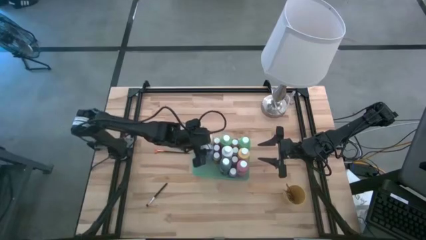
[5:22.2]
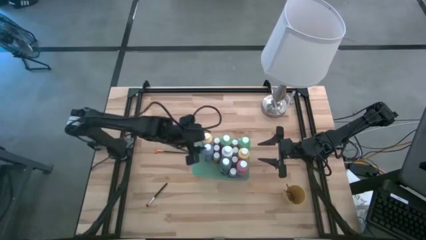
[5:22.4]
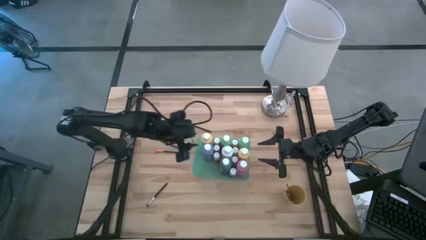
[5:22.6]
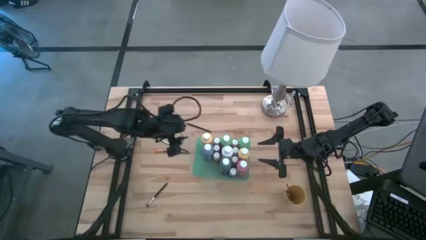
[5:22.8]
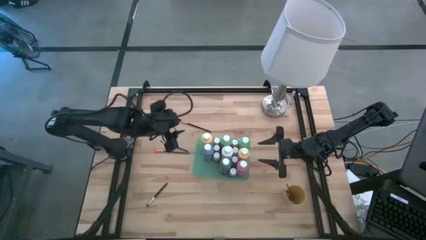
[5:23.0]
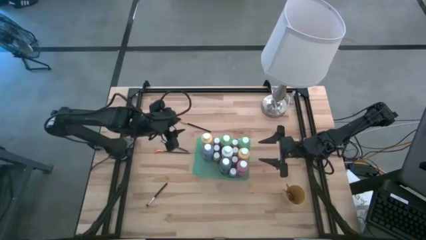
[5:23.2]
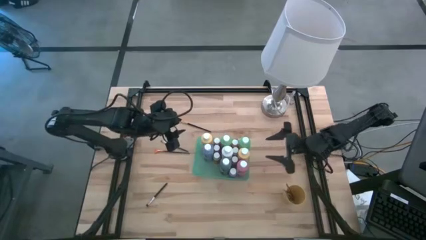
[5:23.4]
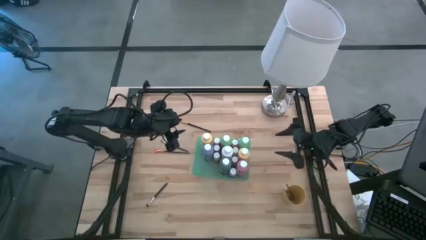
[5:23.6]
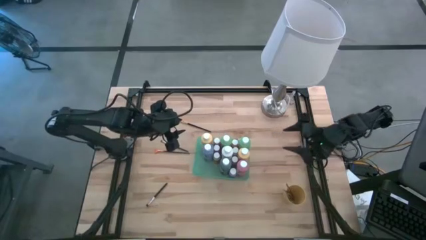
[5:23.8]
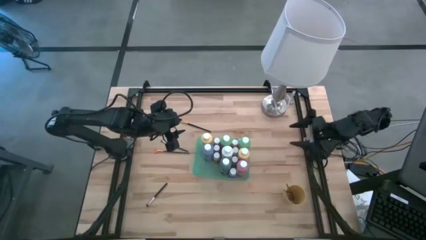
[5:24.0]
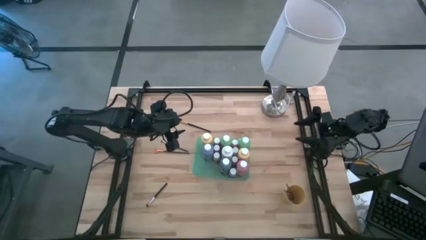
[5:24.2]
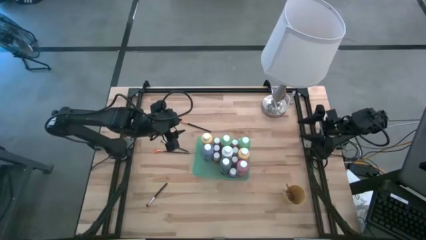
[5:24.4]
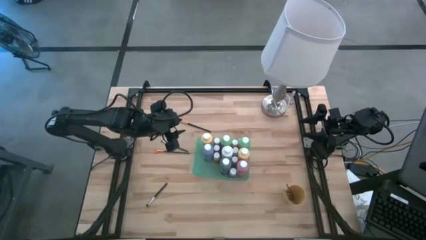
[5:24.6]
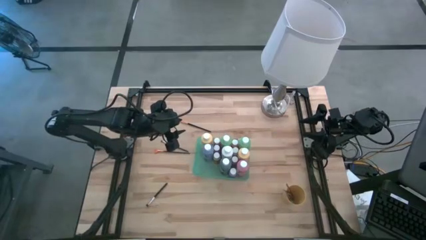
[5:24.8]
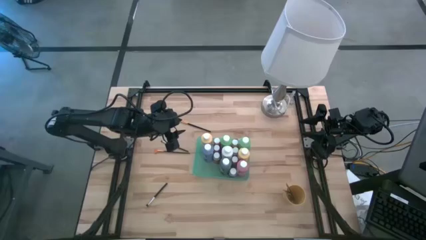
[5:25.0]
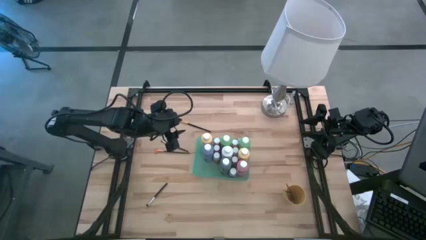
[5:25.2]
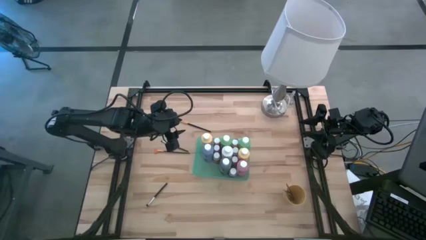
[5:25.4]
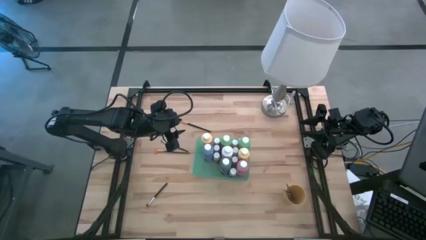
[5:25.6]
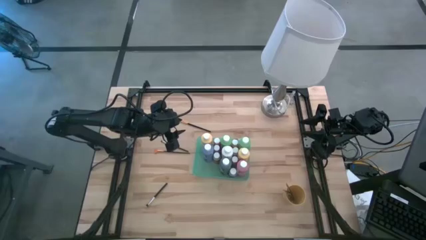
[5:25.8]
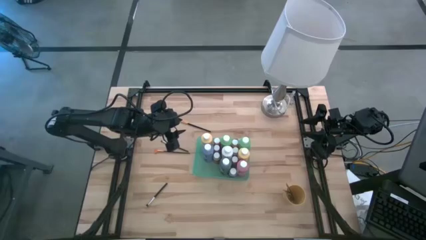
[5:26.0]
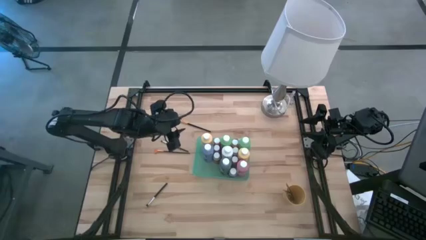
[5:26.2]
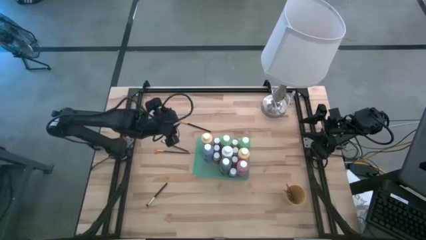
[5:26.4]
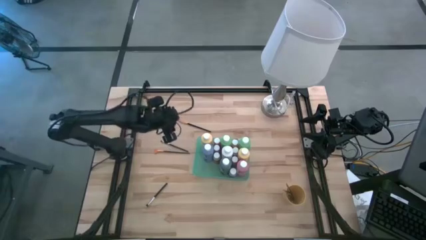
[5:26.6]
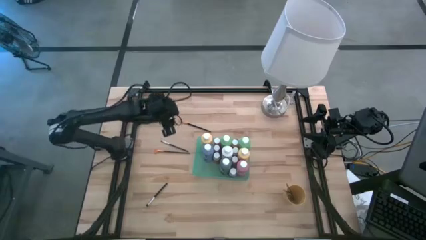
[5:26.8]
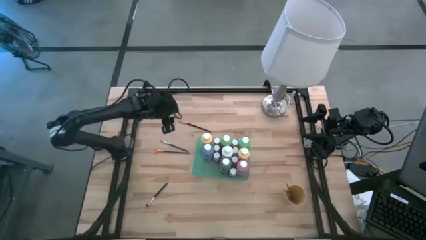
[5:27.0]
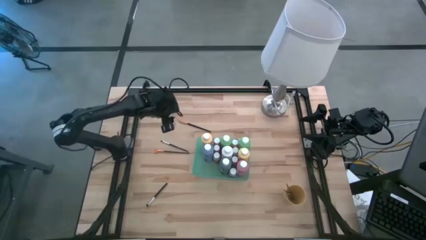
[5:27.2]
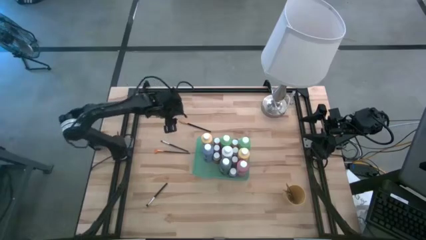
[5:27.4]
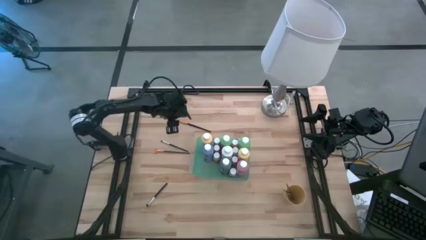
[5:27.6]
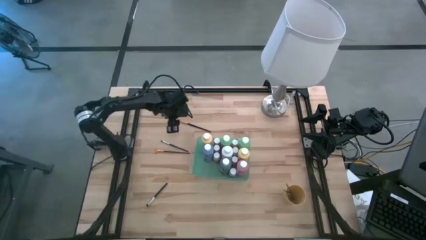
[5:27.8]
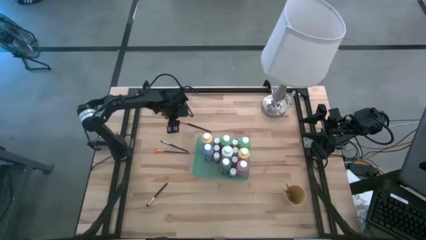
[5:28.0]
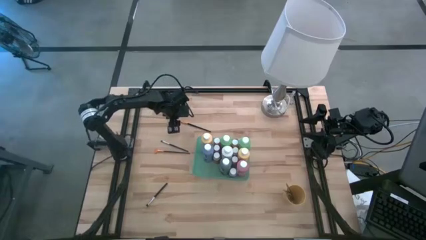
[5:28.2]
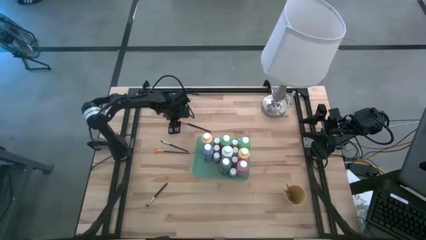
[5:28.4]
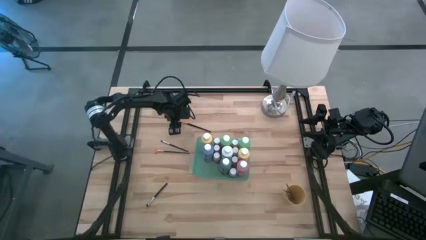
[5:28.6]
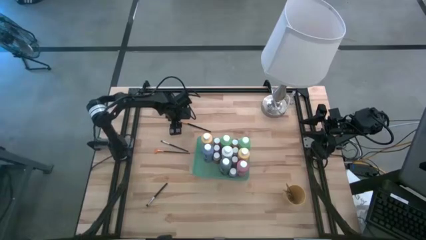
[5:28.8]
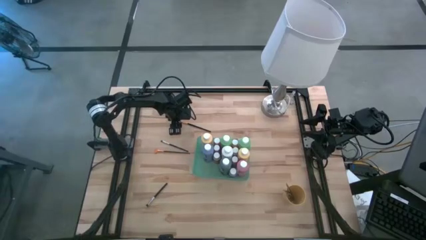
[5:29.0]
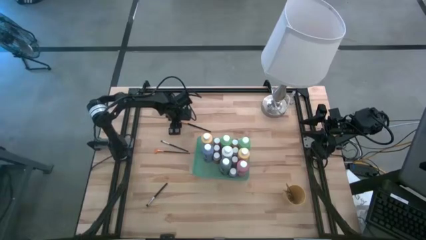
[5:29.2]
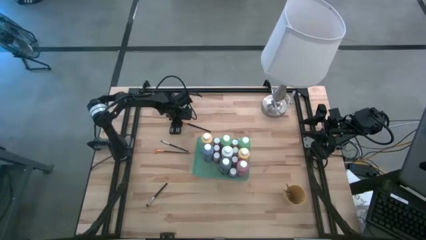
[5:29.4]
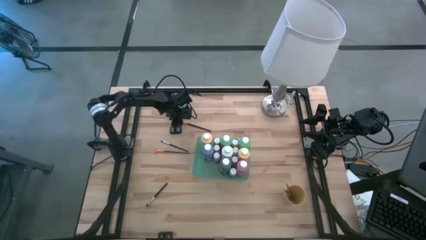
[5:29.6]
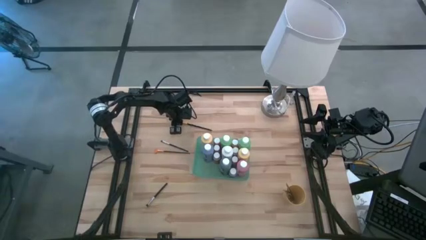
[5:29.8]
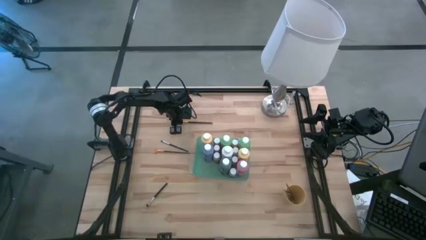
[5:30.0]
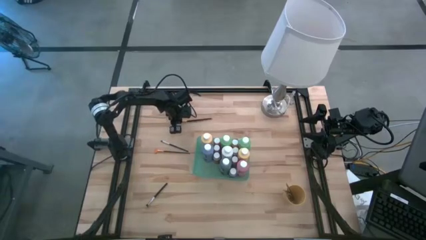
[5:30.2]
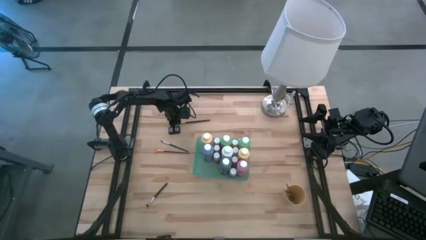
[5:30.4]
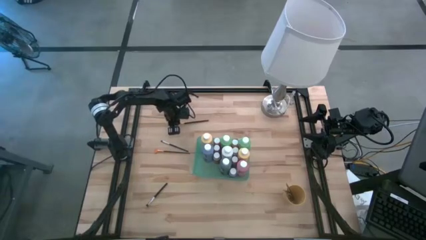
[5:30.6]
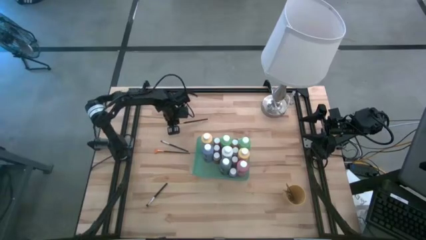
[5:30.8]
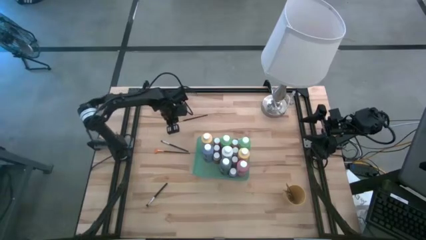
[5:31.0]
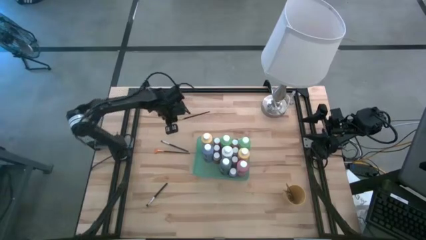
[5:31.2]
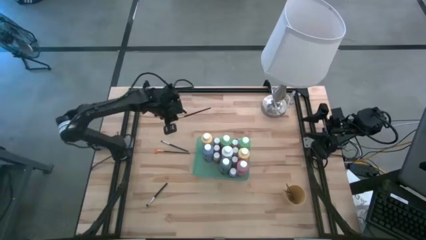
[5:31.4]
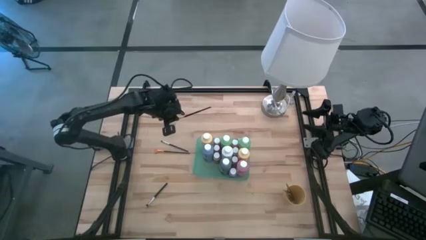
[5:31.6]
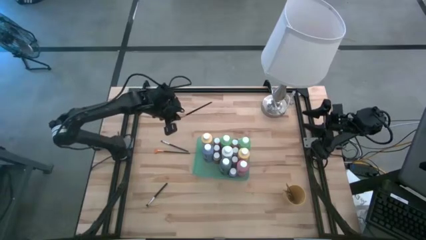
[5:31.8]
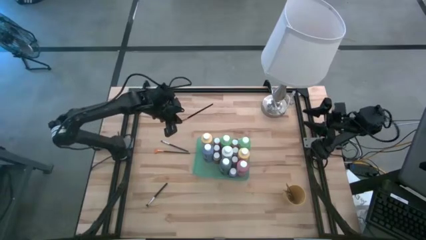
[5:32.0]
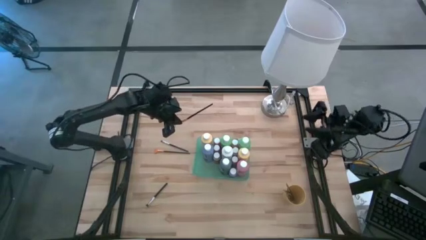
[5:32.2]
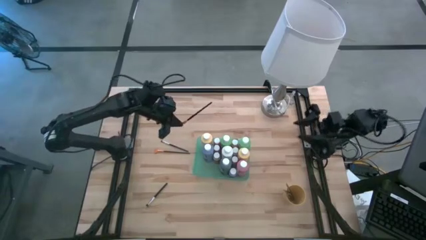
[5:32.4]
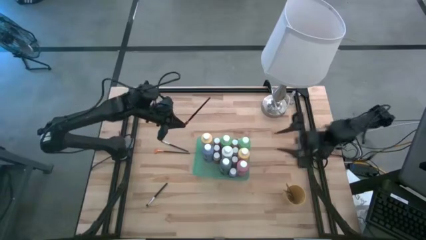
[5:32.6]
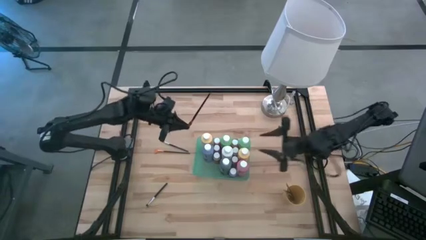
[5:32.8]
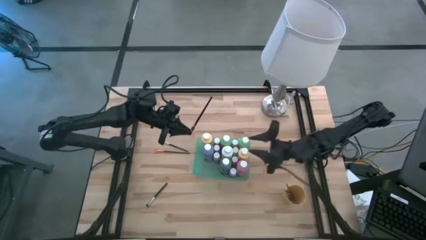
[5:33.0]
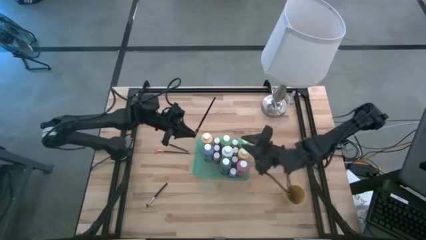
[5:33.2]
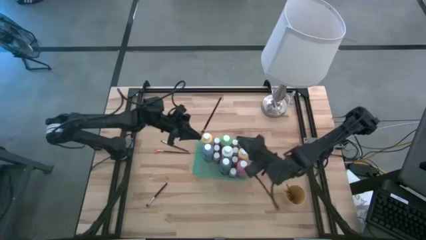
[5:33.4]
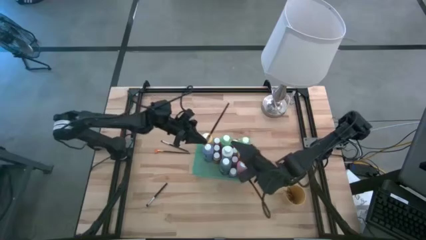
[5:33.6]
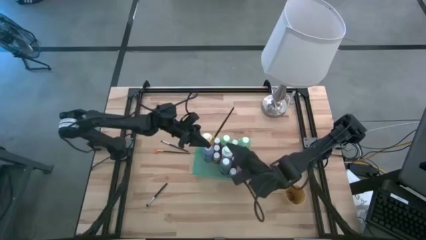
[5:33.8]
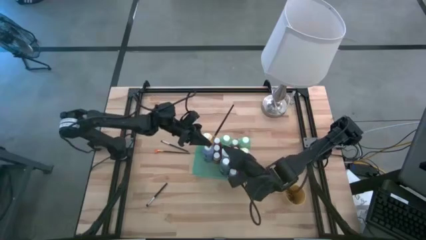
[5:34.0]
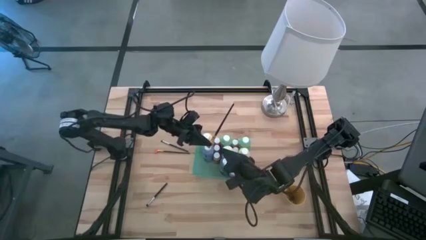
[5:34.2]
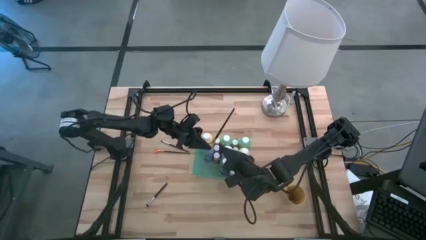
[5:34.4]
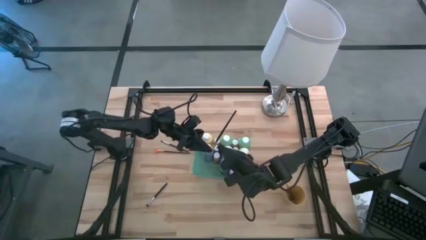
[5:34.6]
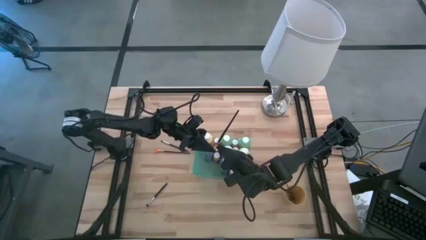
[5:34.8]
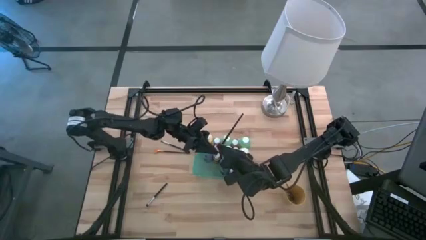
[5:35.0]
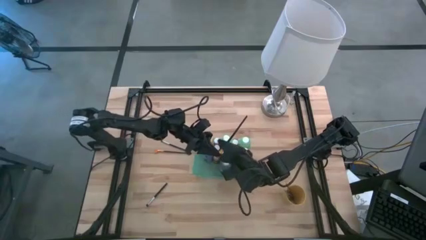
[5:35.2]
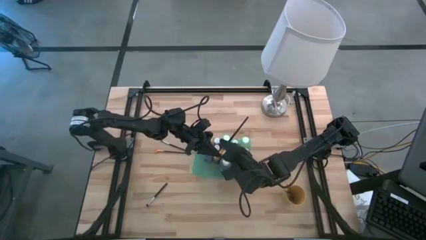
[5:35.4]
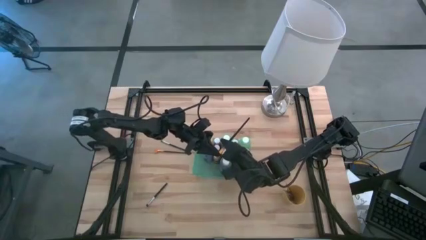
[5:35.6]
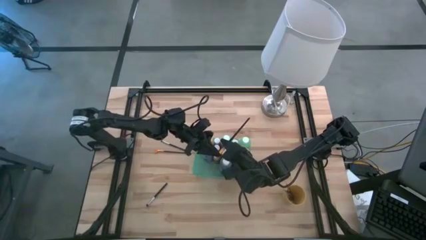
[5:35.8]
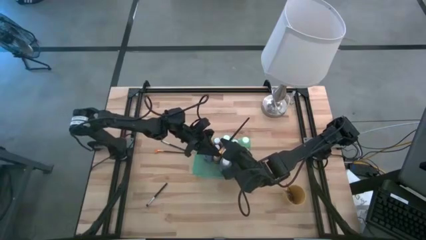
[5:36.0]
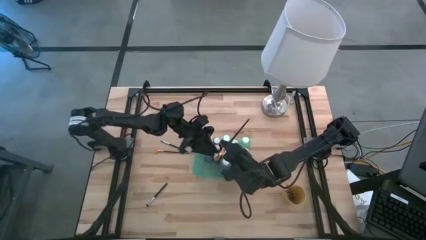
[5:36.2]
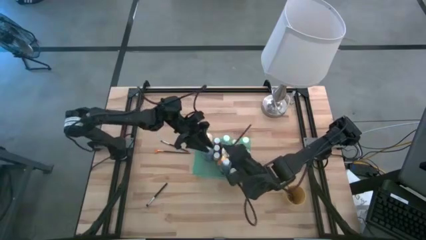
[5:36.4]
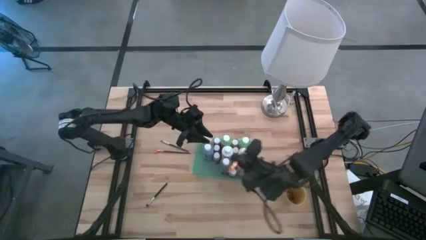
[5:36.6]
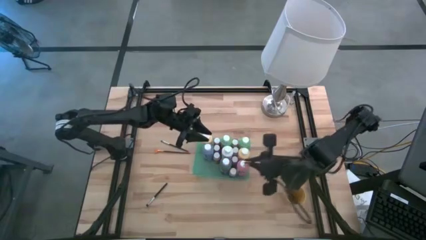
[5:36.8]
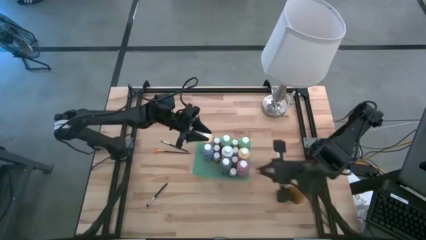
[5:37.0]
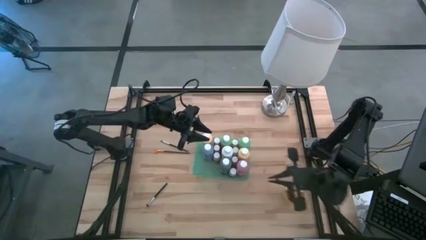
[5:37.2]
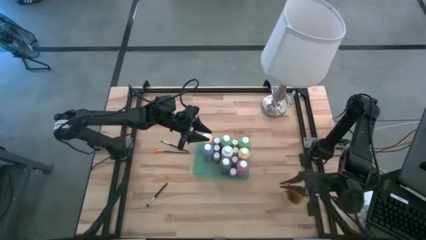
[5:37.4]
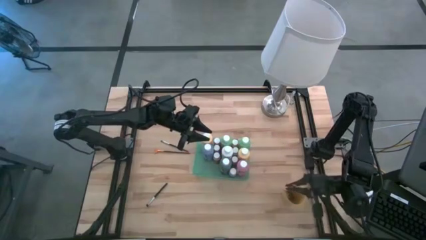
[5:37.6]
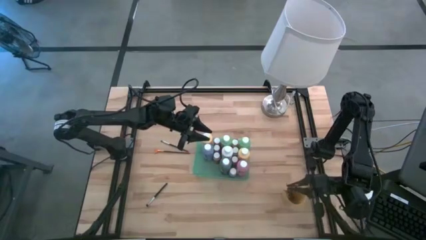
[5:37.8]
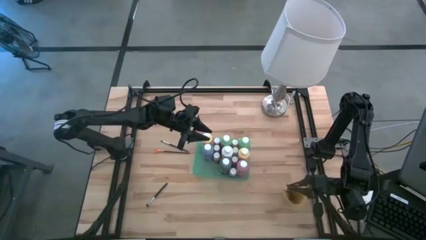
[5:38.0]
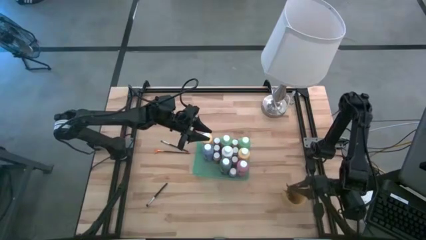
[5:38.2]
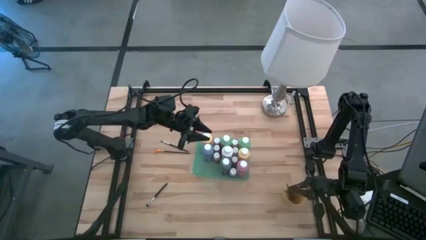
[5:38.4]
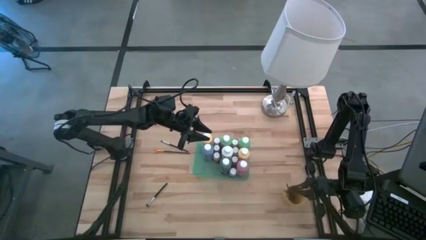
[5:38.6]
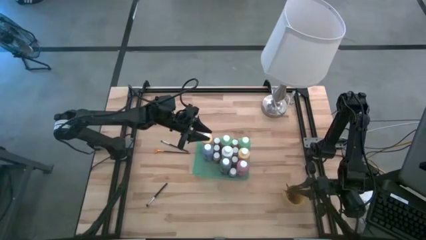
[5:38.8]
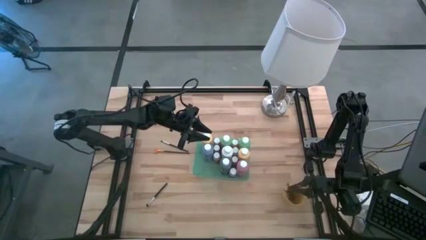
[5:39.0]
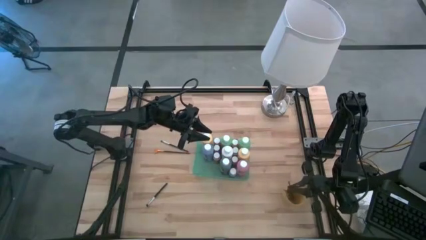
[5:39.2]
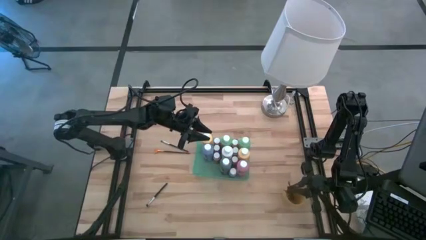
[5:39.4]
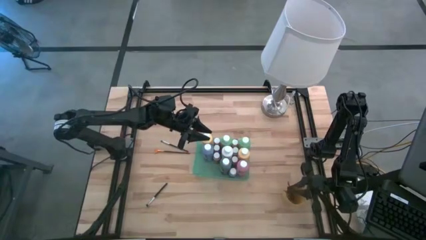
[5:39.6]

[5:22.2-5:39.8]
Task: Pick & Place Paint Supplies
Put the gold paintbrush into the yellow cup
